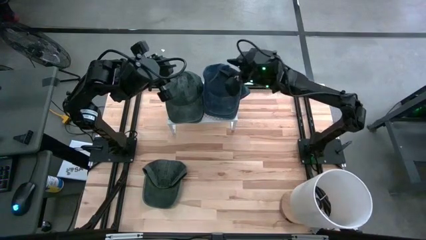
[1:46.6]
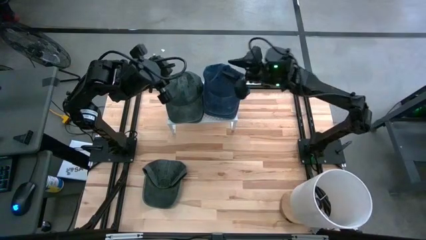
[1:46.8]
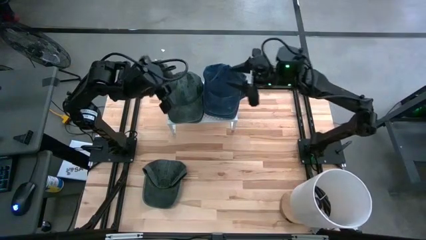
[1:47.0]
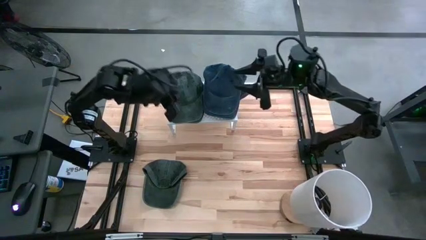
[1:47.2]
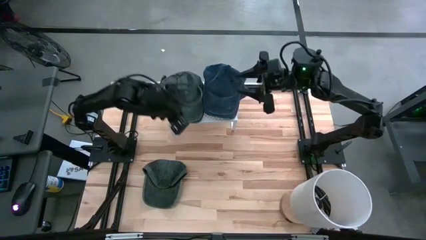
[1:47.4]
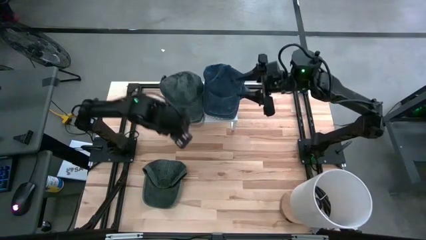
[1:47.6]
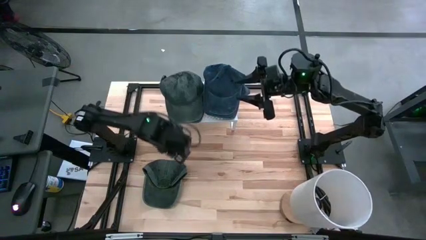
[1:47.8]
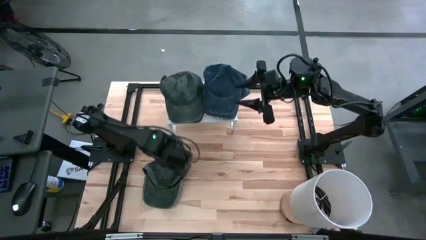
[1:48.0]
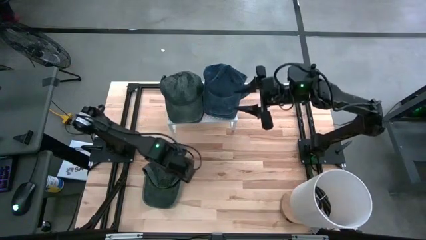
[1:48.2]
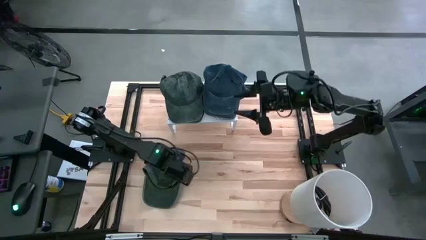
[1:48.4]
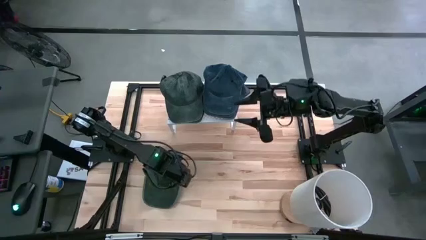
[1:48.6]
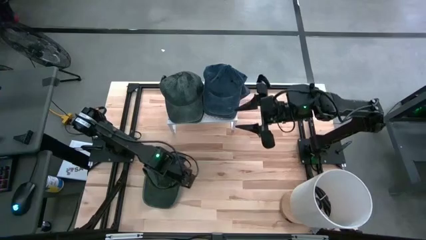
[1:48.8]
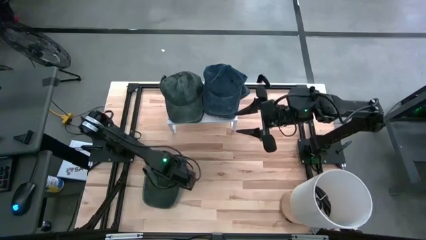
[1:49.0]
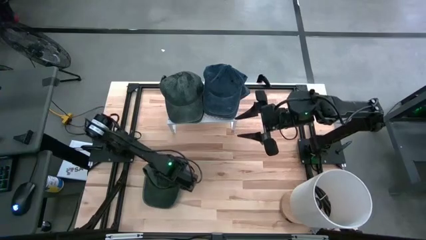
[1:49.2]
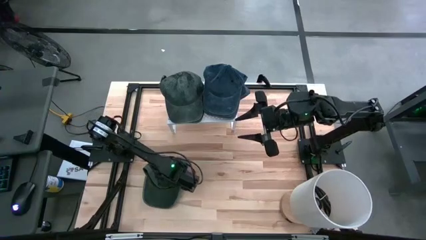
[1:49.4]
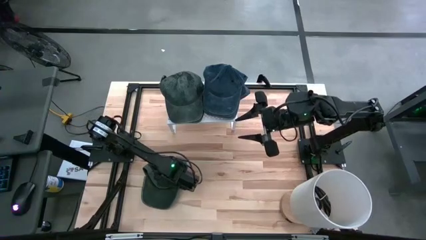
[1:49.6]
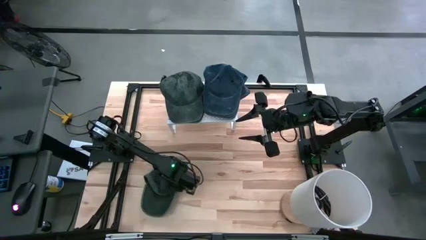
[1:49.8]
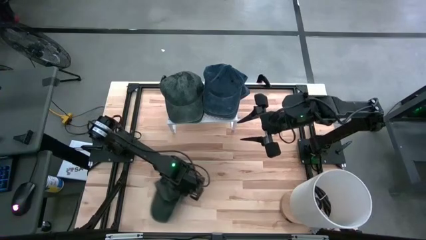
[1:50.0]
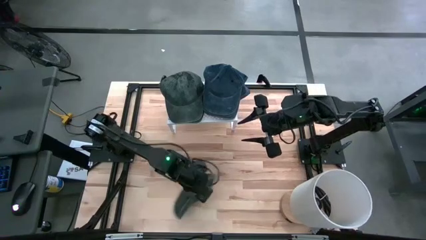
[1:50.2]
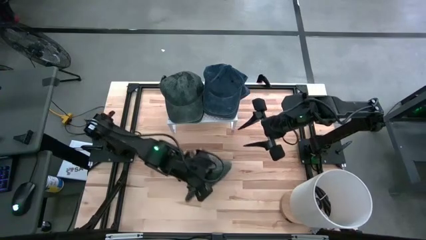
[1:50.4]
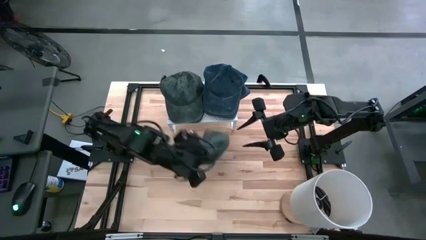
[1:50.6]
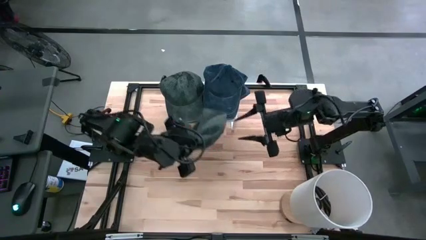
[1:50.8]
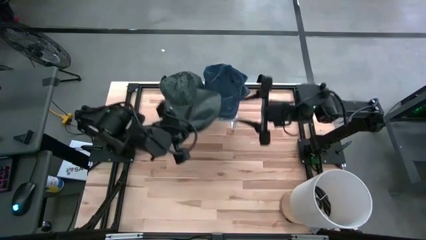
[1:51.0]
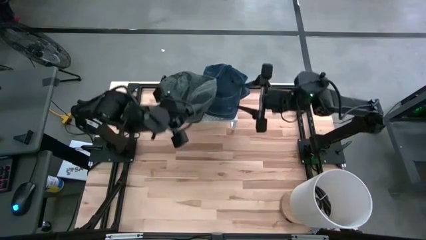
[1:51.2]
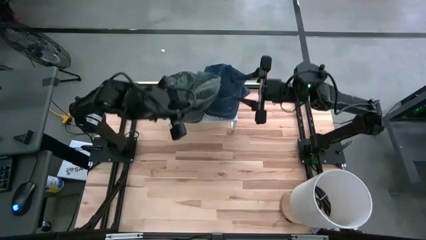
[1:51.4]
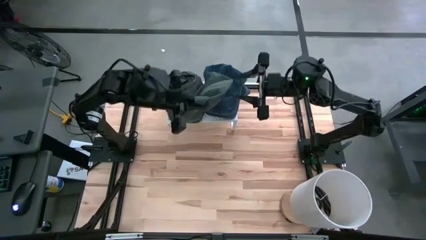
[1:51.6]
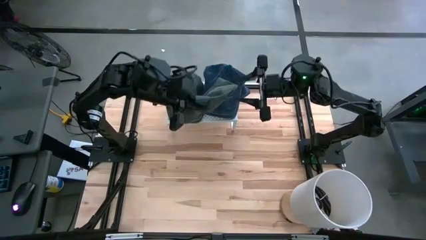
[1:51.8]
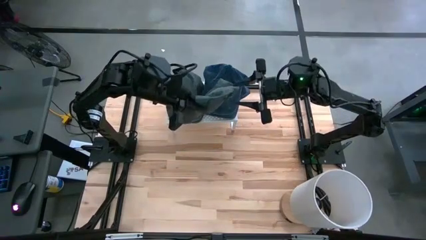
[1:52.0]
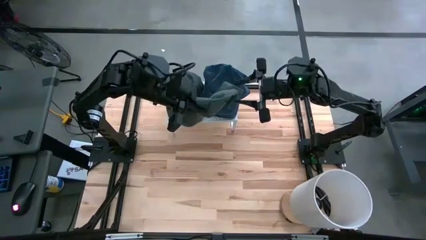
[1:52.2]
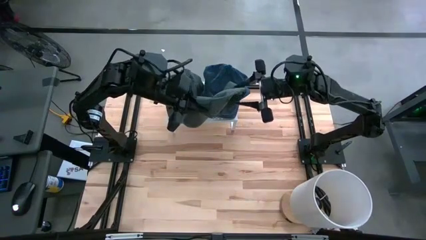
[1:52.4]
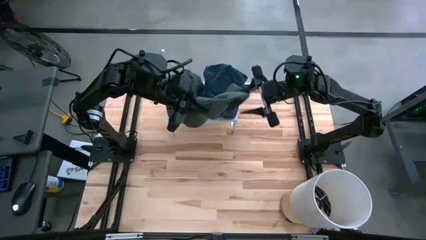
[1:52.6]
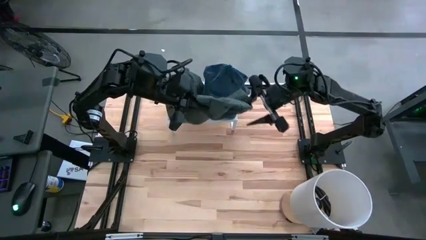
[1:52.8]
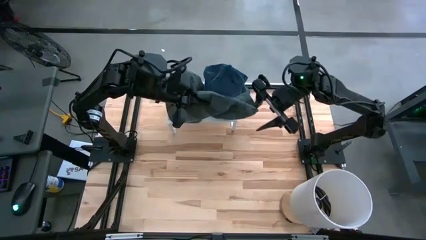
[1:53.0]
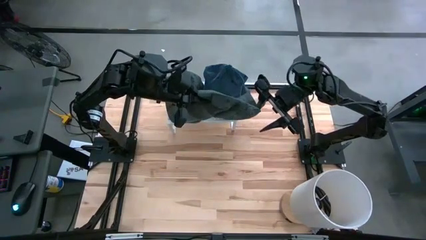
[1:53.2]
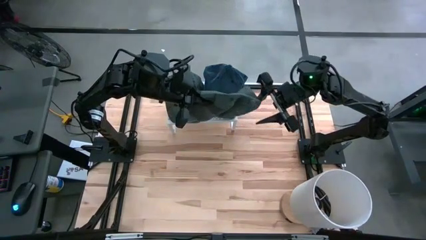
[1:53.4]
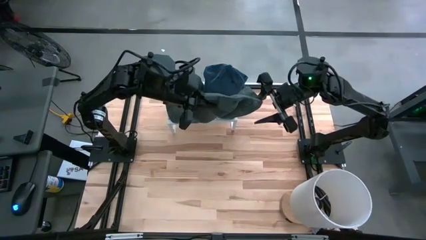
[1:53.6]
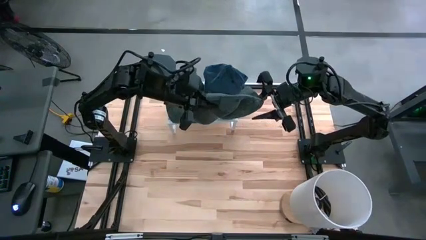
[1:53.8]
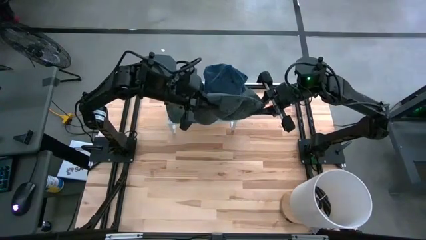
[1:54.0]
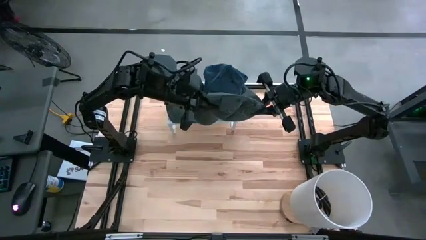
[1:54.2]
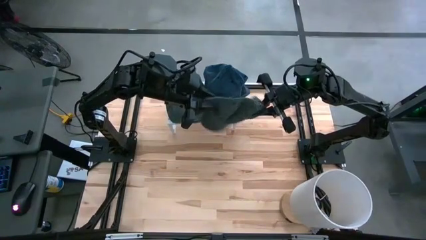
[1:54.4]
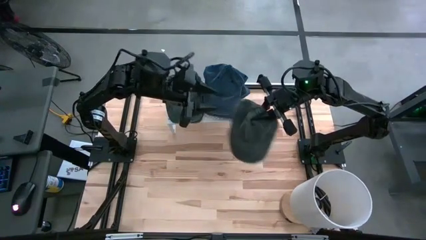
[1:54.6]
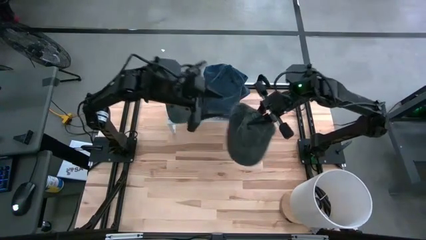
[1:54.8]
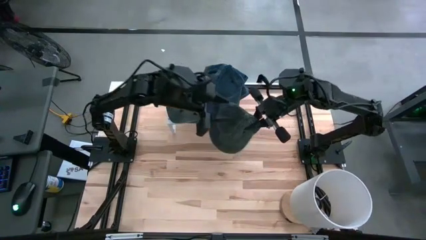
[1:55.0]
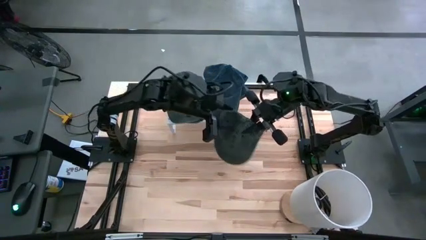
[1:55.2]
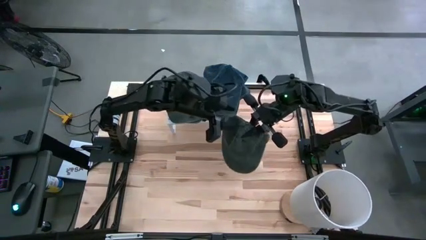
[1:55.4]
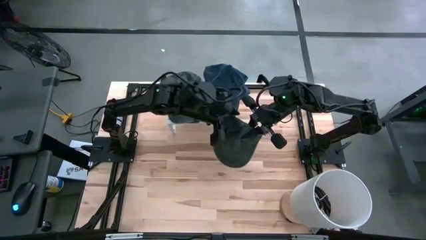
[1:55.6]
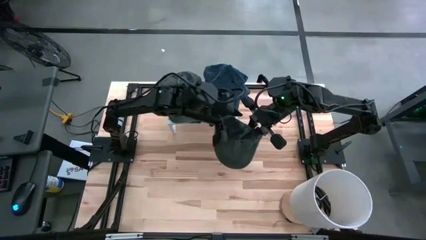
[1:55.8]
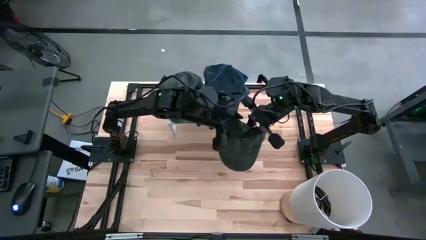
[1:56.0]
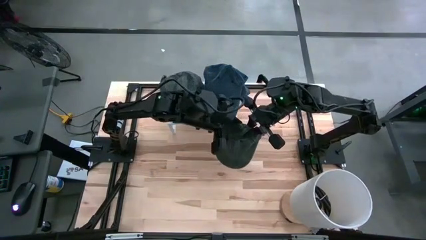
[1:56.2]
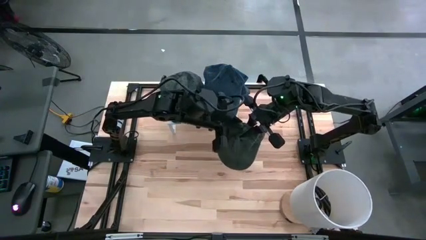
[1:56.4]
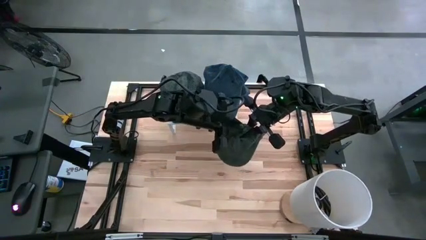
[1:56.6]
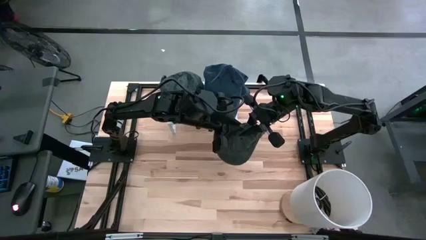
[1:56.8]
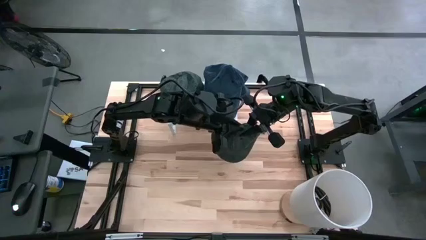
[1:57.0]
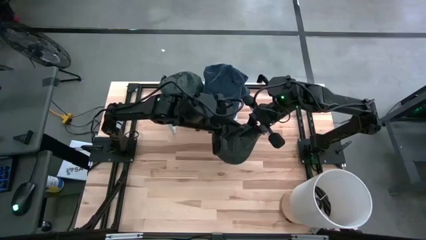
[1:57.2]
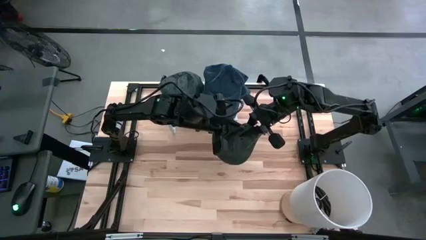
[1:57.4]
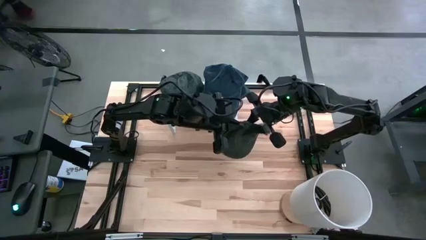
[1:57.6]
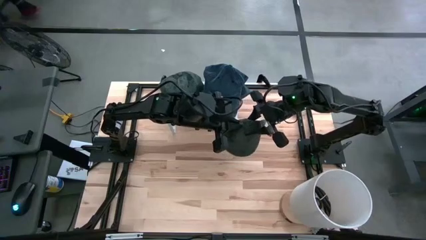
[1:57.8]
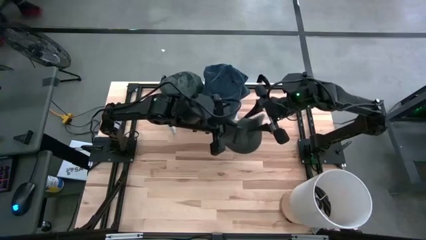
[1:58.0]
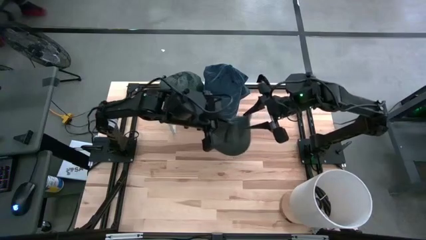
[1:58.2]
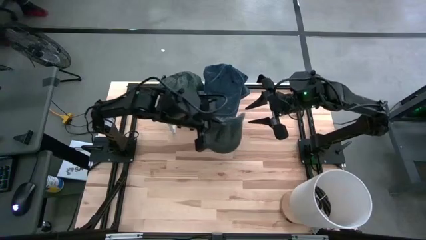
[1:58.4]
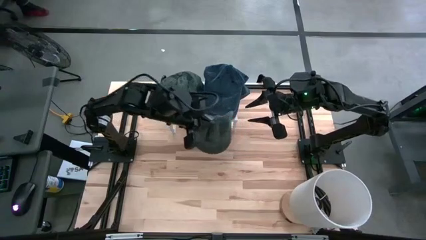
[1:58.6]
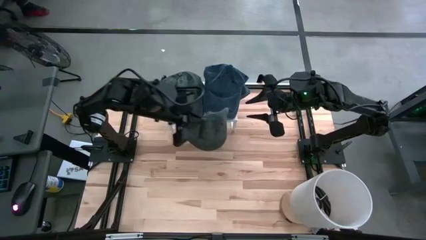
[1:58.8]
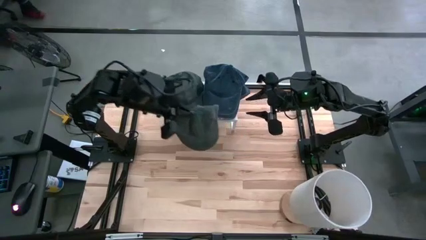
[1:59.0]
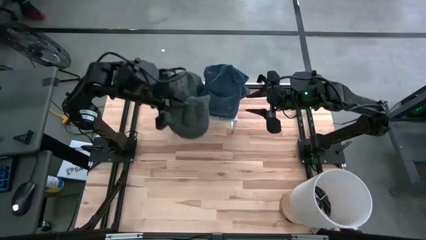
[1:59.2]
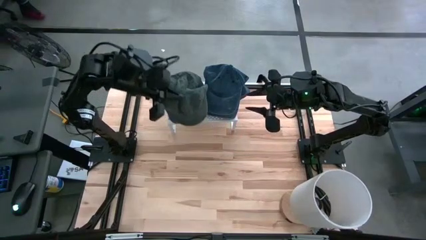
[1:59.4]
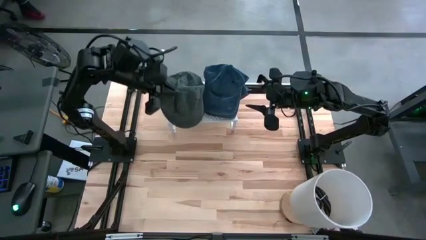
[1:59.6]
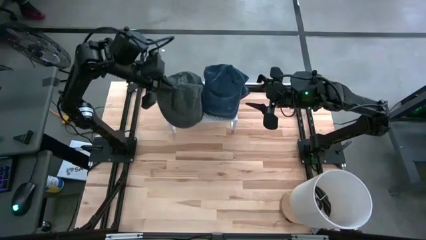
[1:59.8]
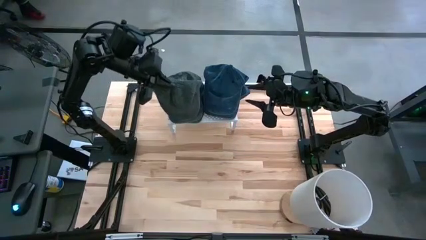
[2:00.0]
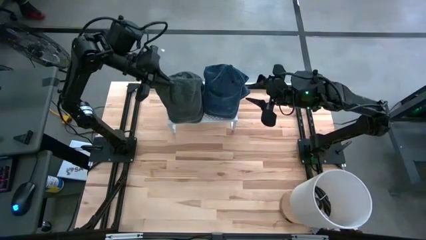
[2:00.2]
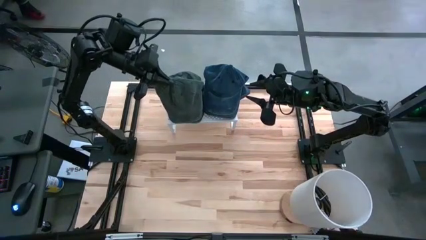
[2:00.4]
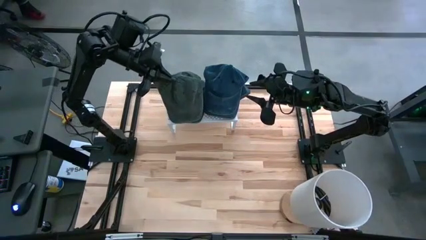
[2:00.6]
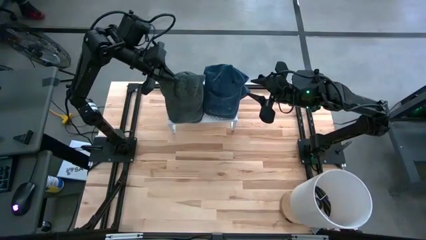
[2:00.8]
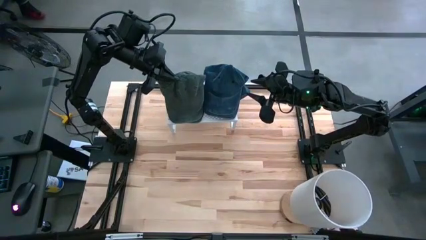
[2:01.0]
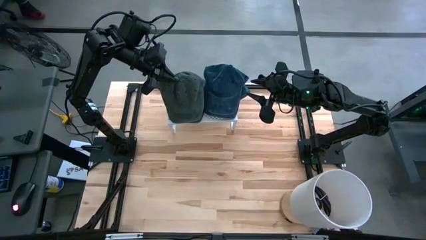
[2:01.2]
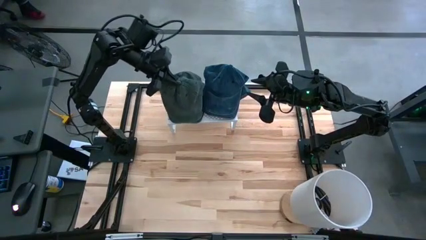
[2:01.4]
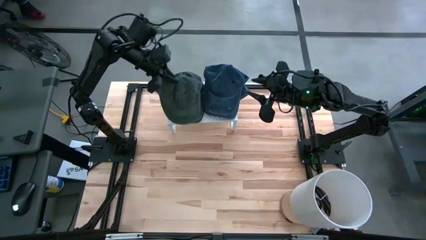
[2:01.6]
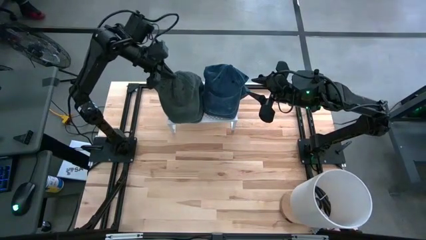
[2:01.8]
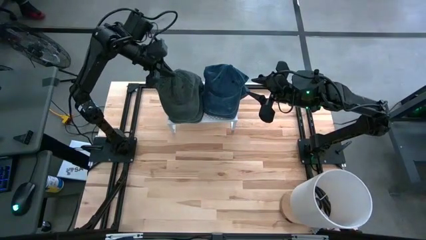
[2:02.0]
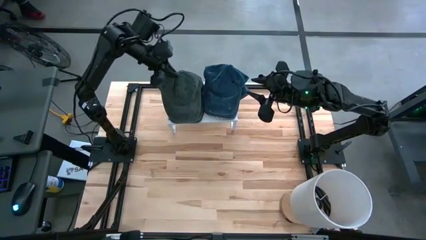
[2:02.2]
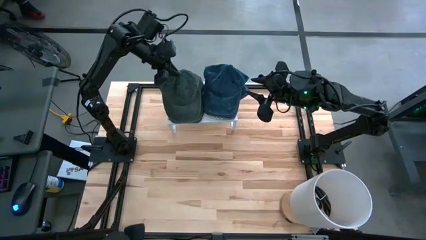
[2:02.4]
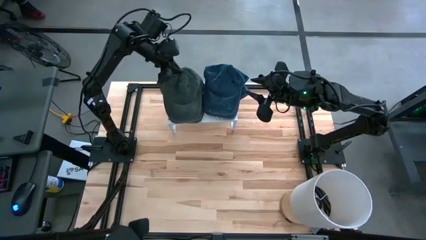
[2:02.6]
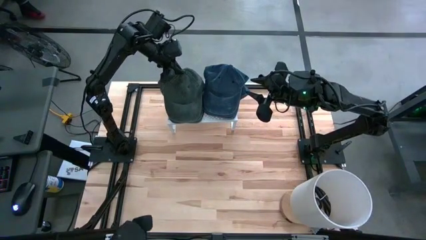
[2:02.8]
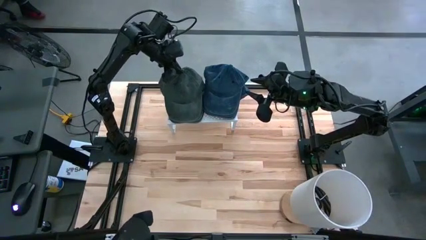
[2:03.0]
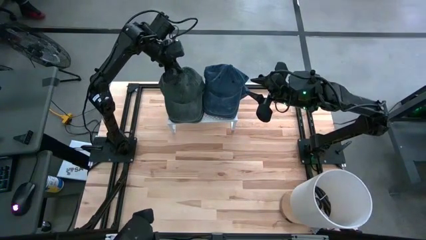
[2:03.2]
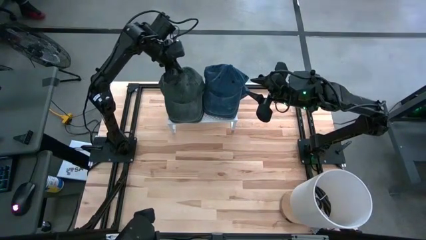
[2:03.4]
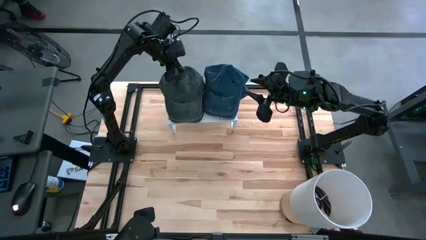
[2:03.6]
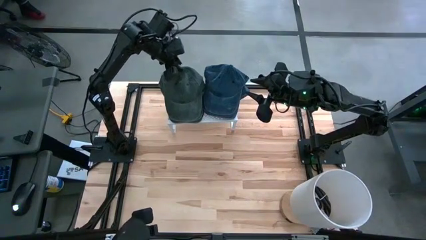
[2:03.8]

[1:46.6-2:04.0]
Task: Pick & Place hat
Stack the gray cap on the gray cap on the shelf
